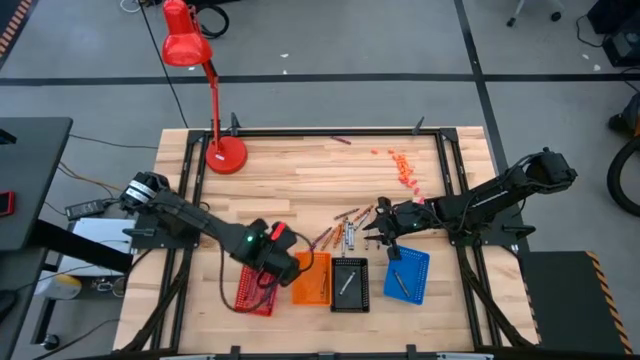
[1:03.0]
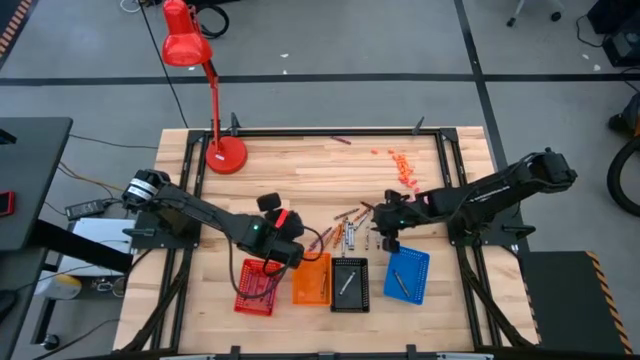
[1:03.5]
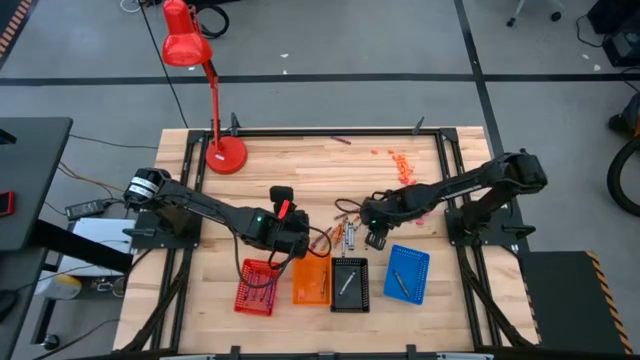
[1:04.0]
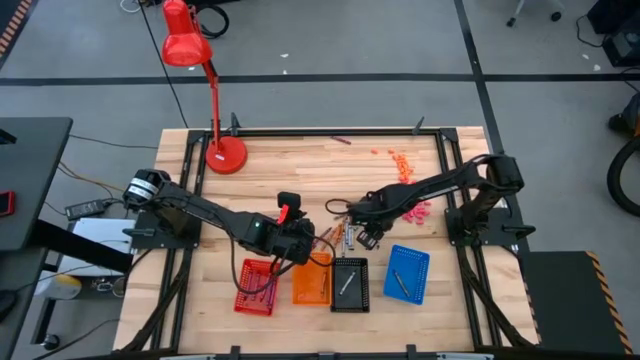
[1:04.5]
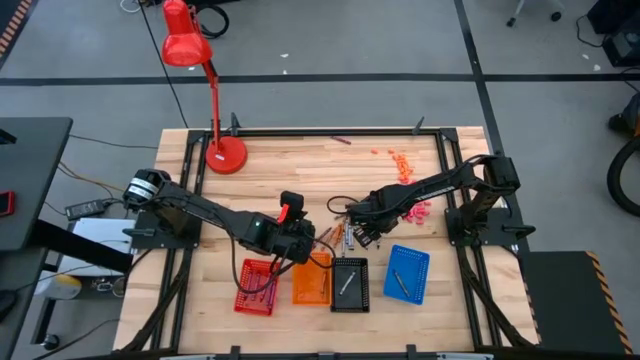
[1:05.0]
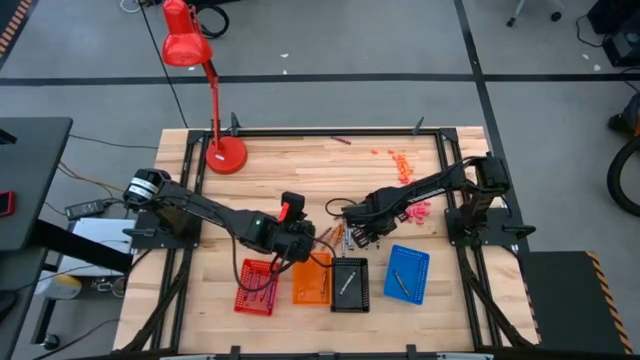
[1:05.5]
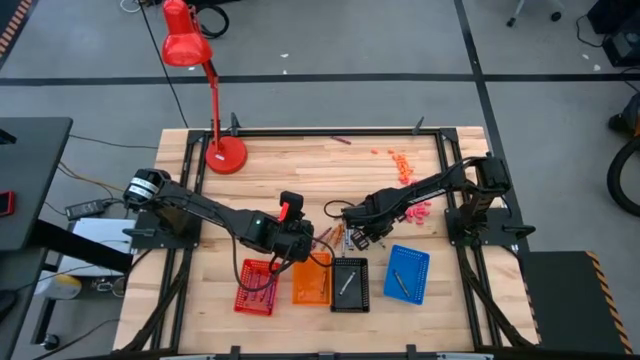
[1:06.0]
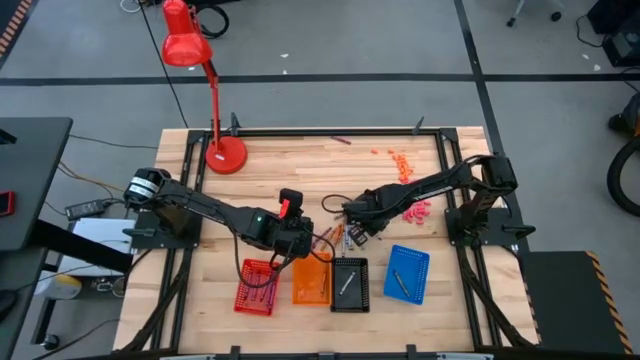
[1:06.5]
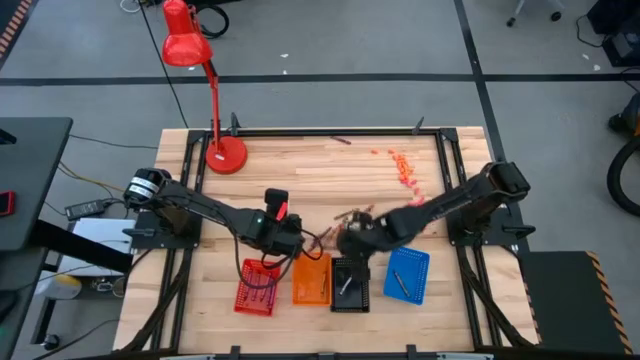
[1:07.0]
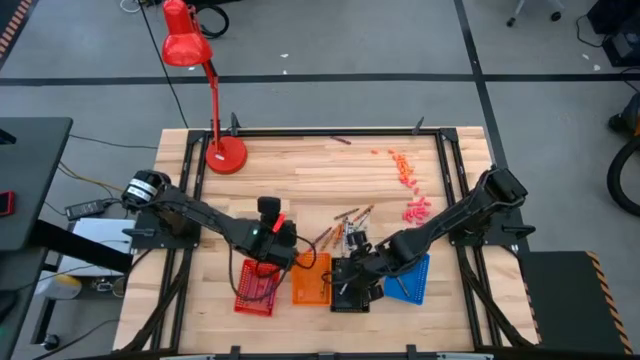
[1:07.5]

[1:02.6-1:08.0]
Task: Sort crayons
Put the black crayon into the black bin

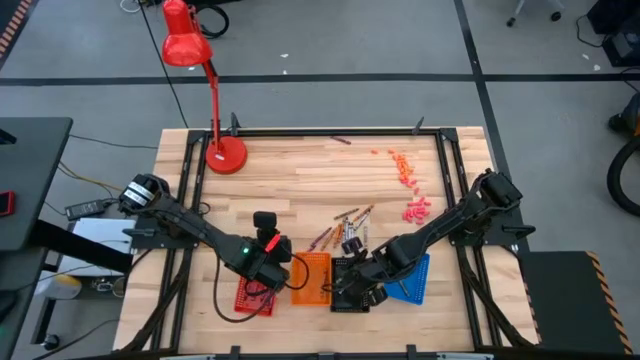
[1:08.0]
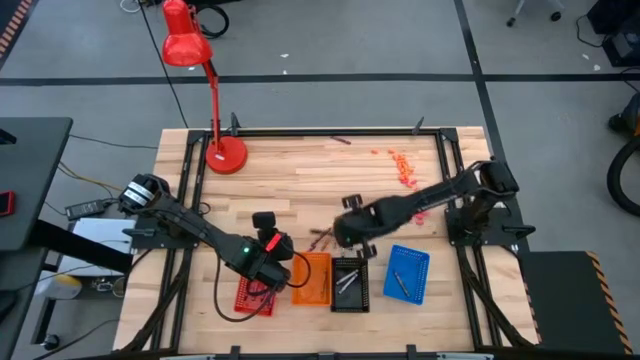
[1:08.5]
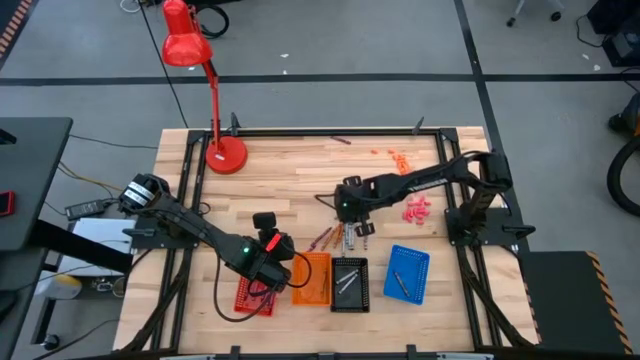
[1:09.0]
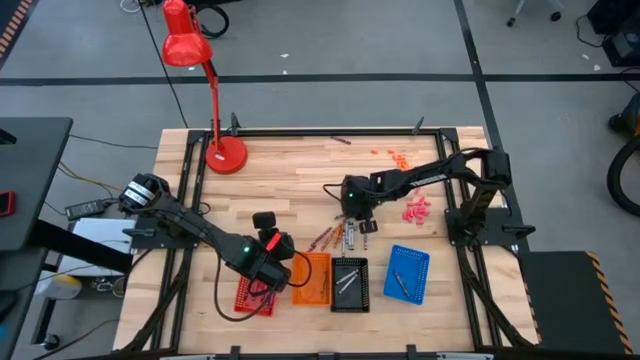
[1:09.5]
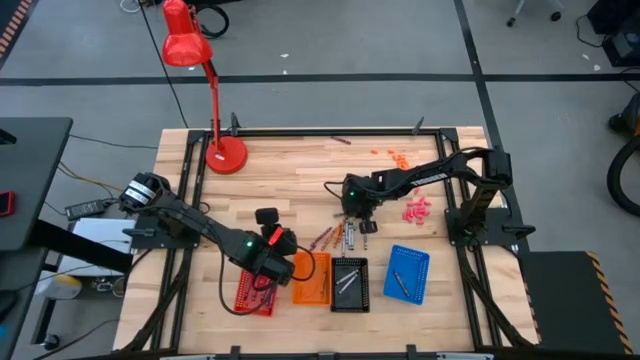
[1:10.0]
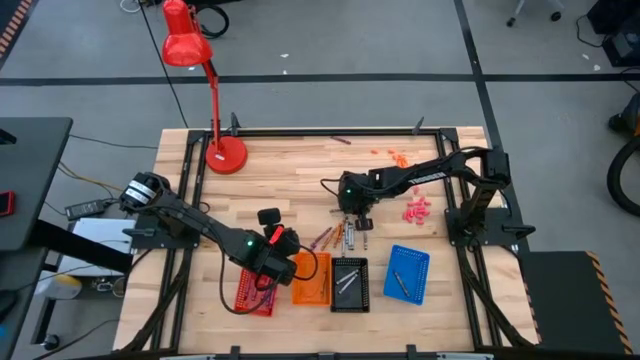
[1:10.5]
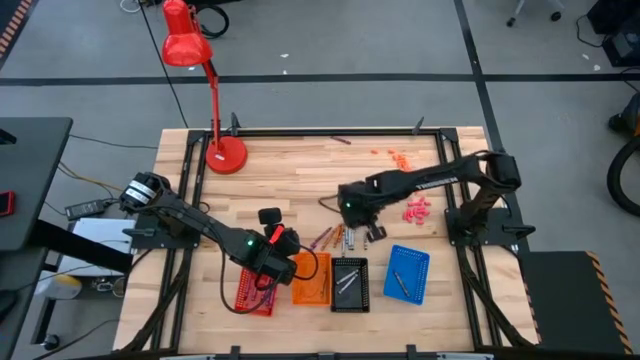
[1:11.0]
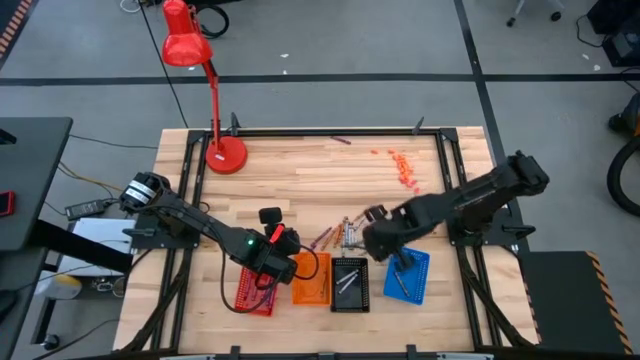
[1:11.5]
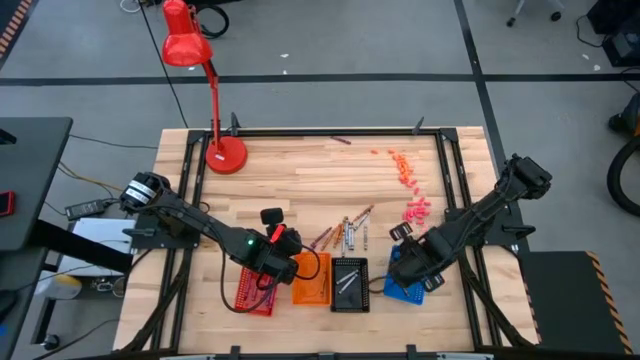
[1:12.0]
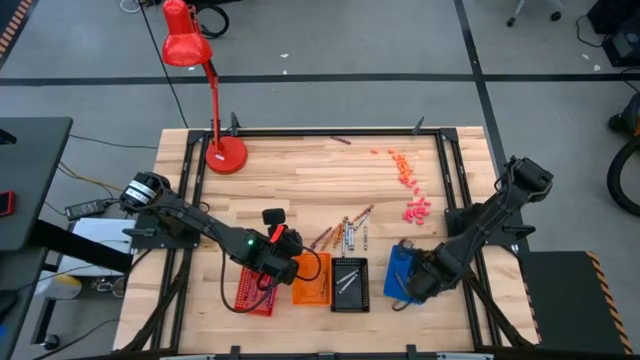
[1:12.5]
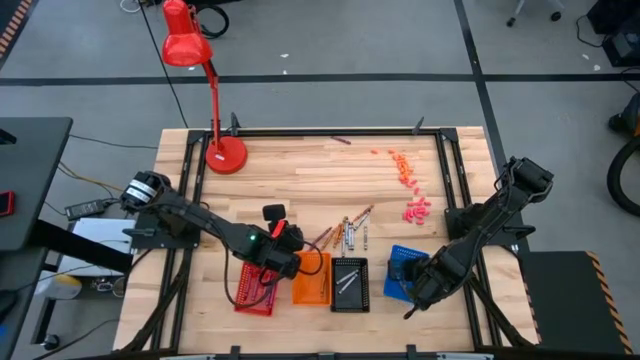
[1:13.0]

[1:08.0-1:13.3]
Put the brown crayon into the blue bin

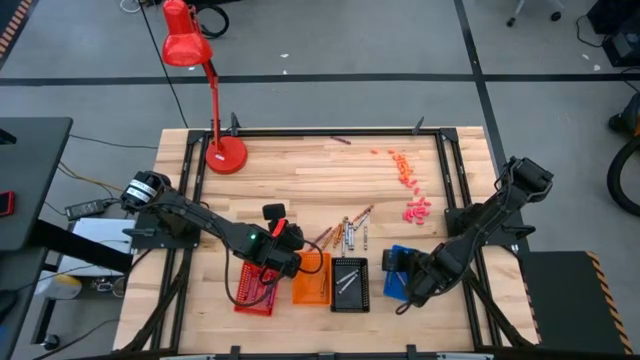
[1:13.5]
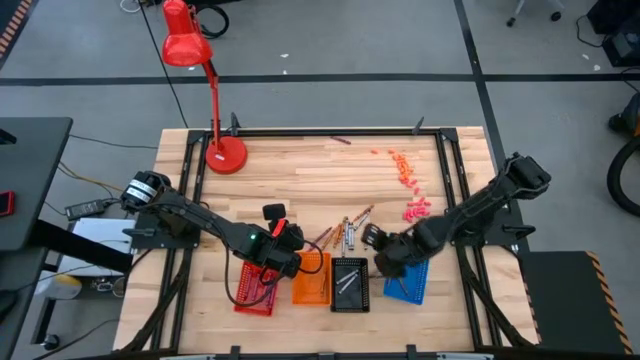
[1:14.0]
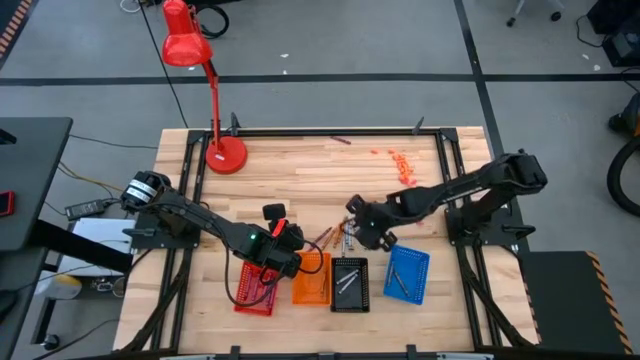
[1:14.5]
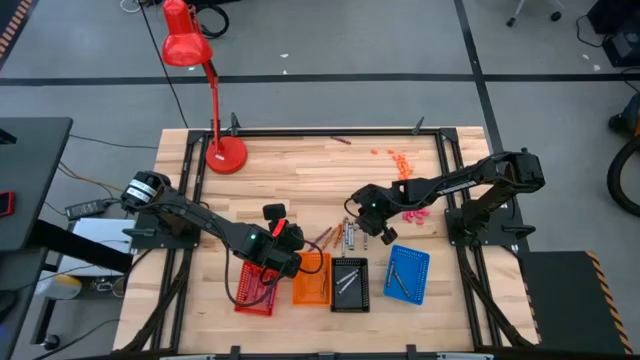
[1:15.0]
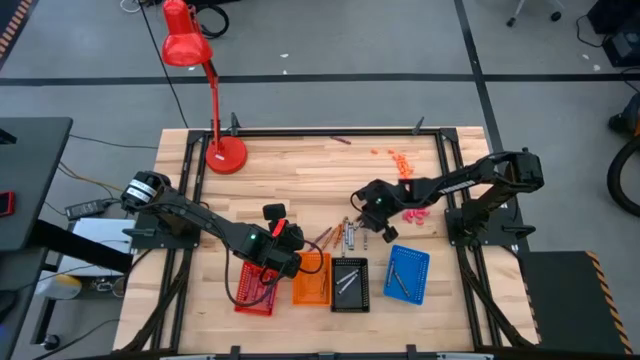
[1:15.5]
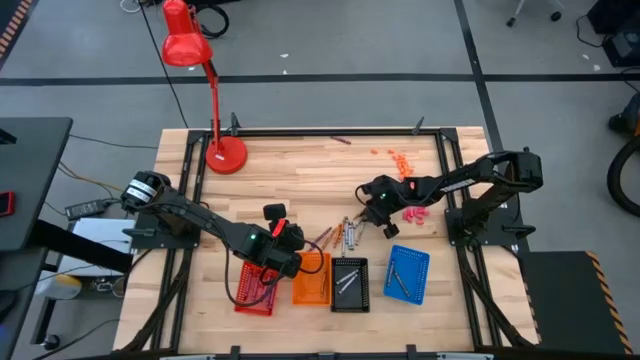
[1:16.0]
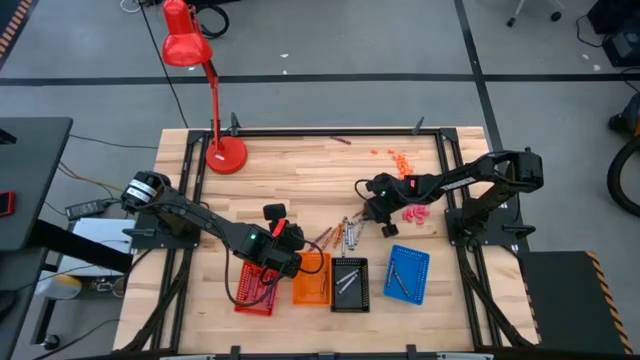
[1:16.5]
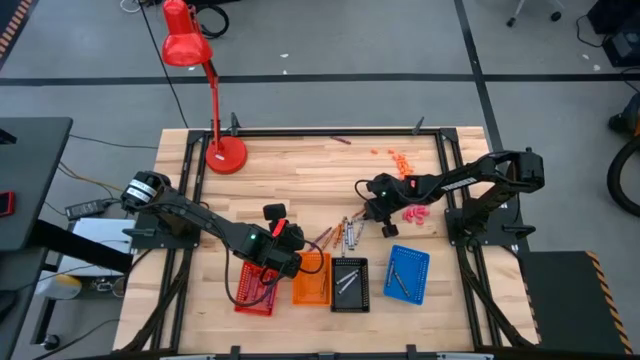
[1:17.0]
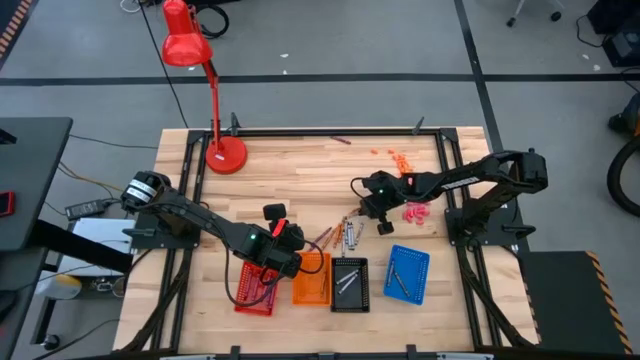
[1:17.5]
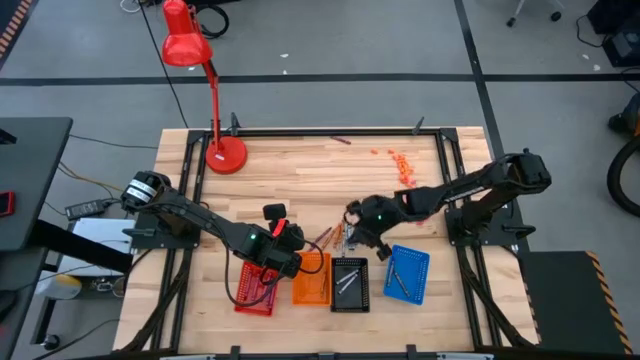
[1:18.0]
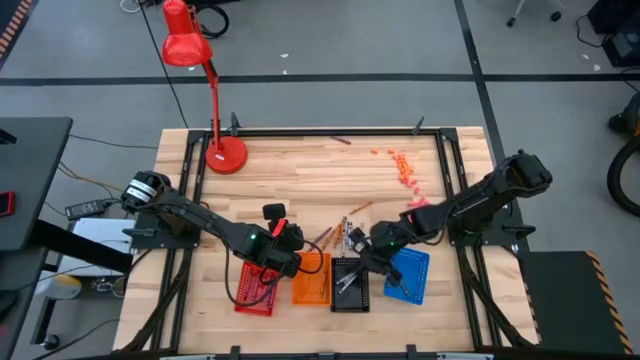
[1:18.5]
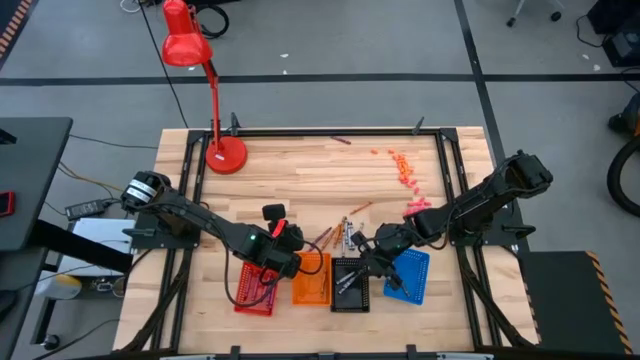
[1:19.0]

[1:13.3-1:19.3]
Put the black crayon into the black bin

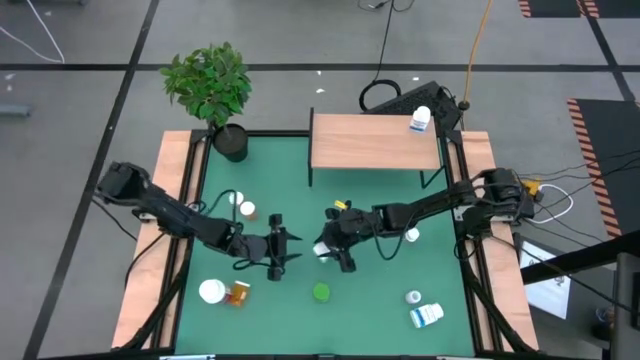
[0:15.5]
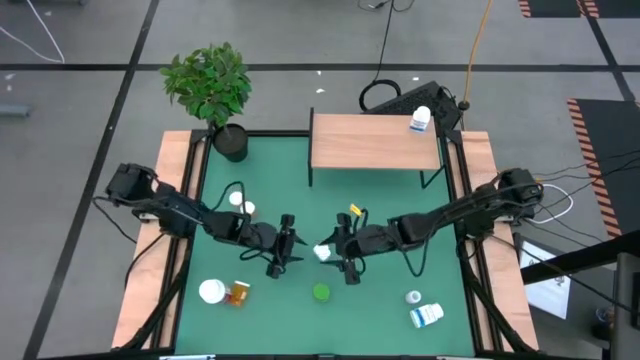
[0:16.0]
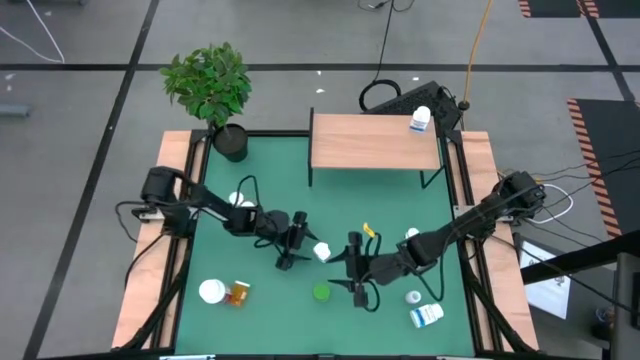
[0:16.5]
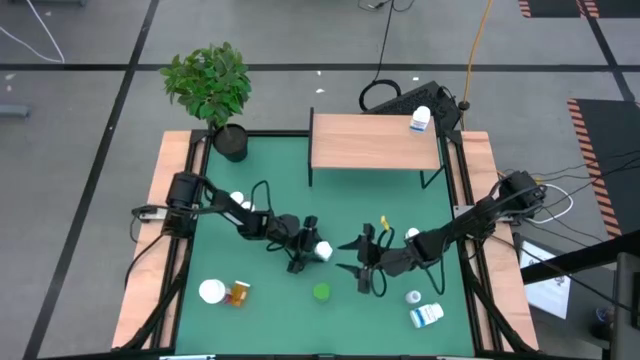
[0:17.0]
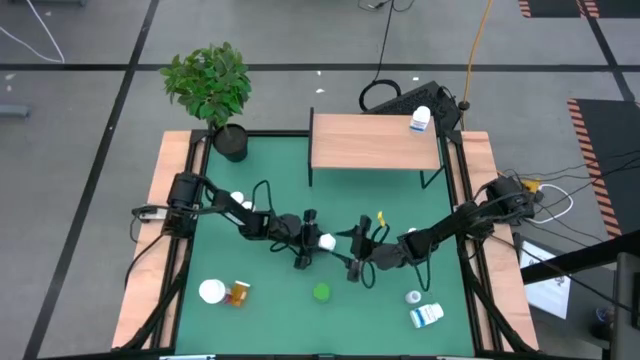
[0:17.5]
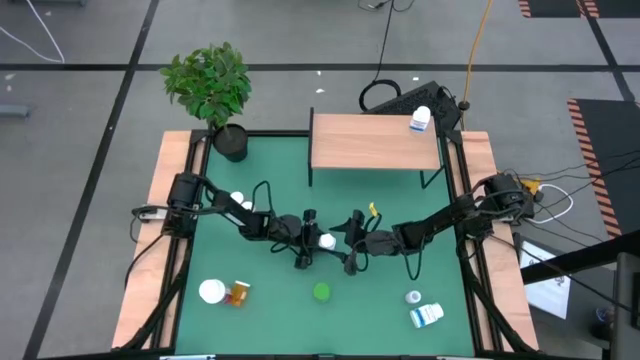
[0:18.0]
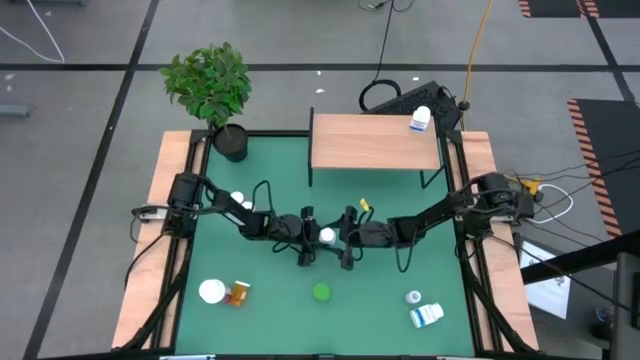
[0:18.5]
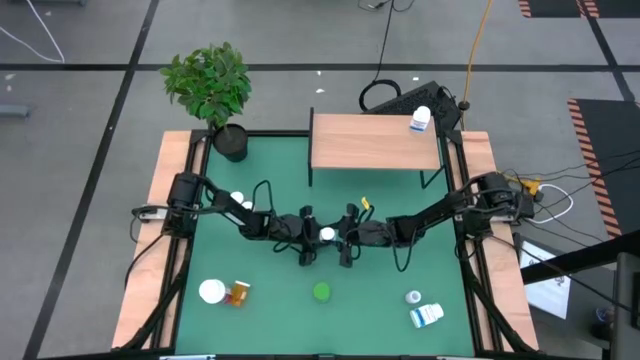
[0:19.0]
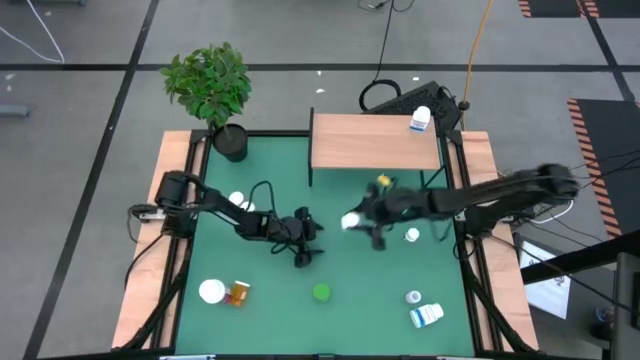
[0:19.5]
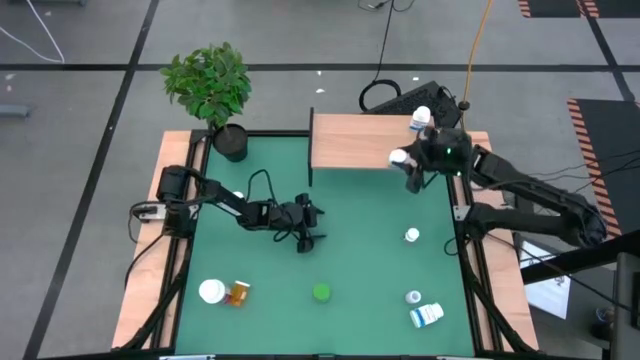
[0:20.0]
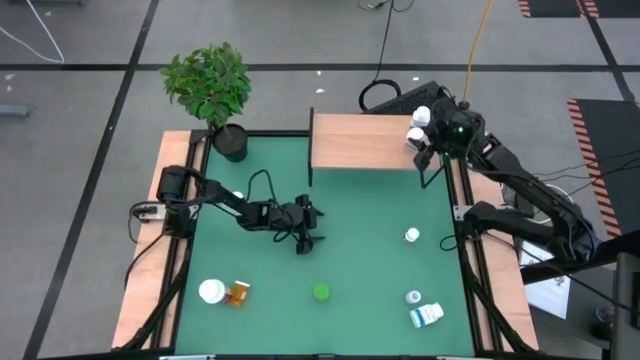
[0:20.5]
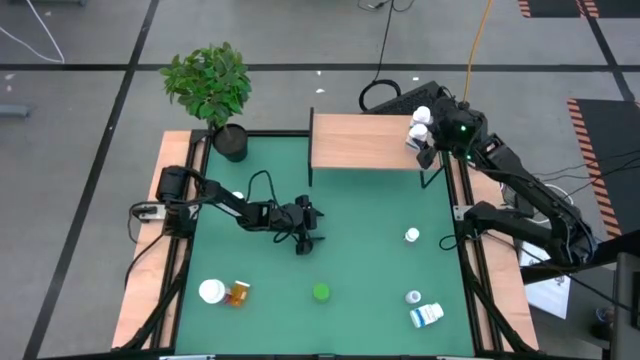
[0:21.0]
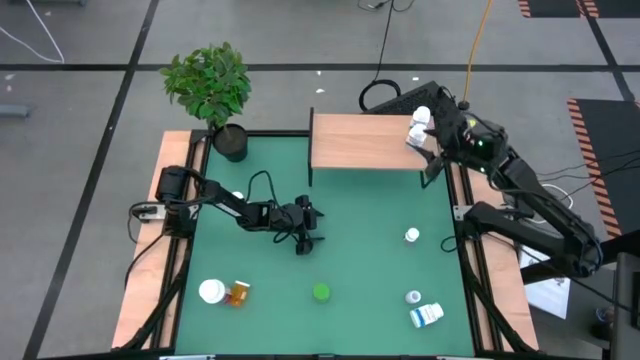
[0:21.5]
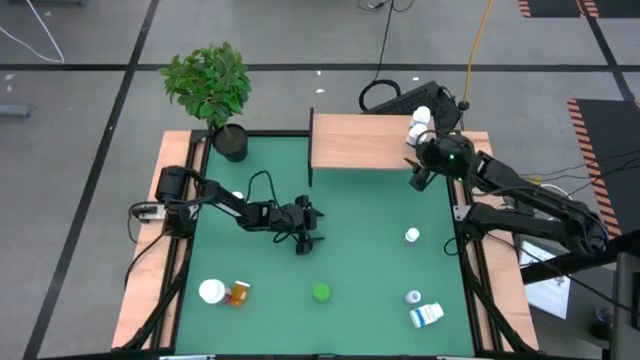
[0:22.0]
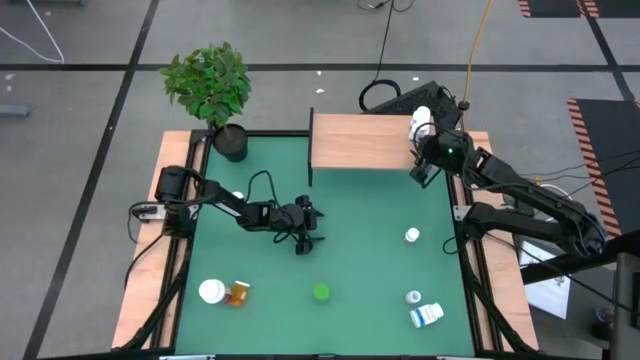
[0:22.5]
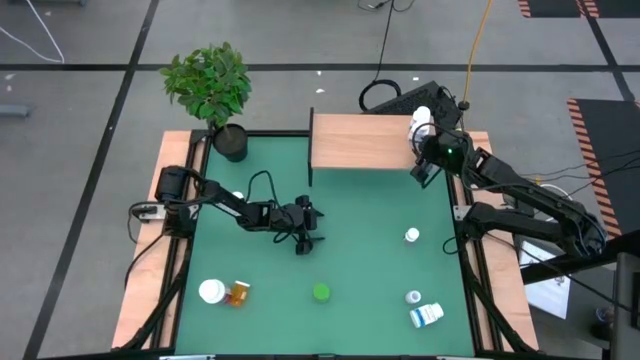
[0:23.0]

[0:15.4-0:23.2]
Task: Pick and place medicine bottles onto shelf by color
Put the top blue pill bottle on the shelf aligned with the other blue pill bottle
